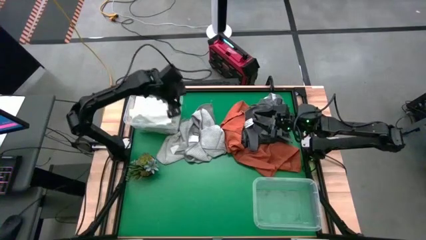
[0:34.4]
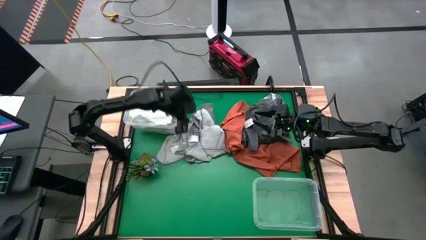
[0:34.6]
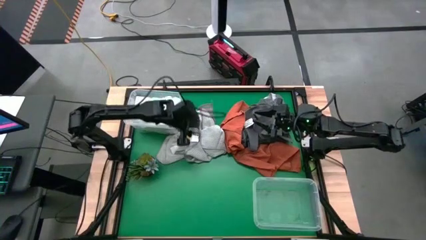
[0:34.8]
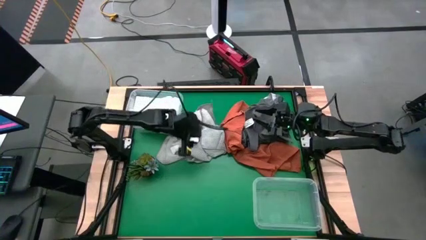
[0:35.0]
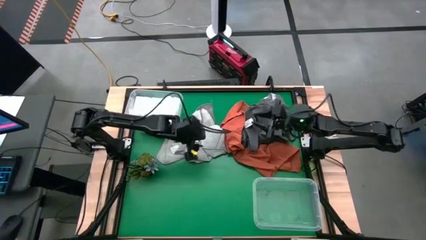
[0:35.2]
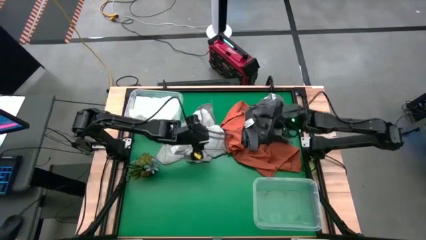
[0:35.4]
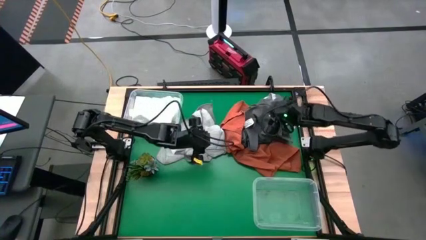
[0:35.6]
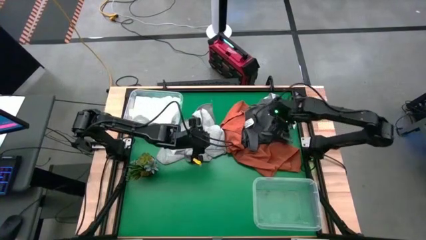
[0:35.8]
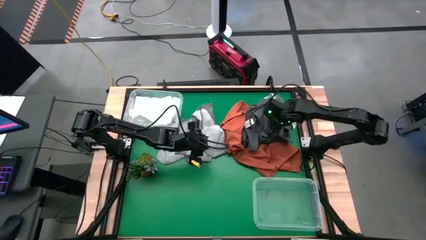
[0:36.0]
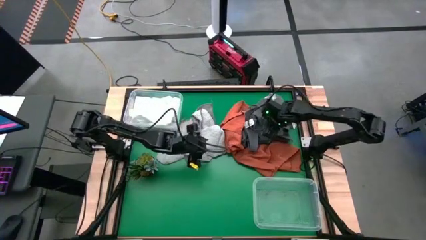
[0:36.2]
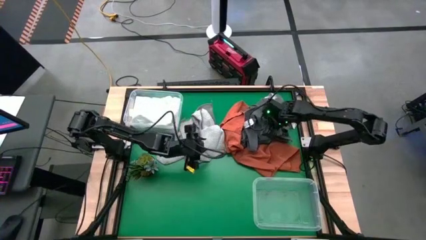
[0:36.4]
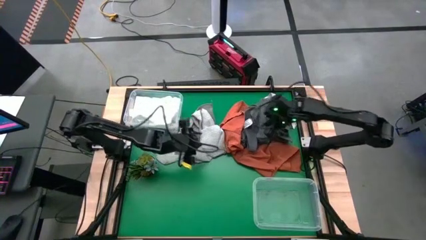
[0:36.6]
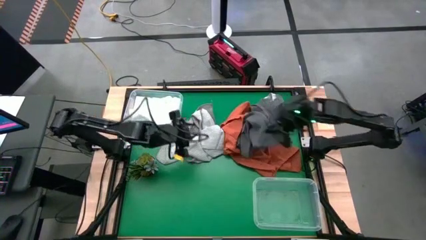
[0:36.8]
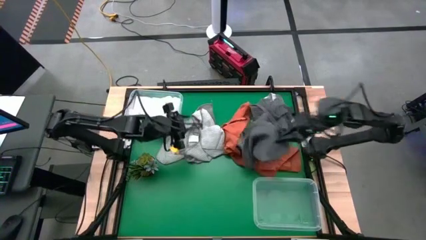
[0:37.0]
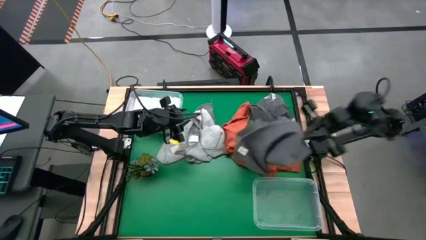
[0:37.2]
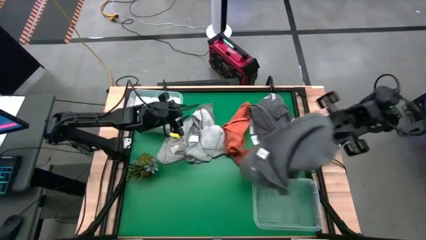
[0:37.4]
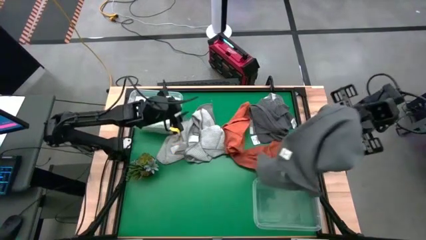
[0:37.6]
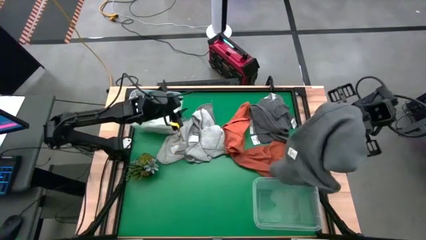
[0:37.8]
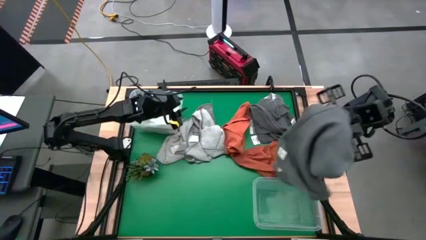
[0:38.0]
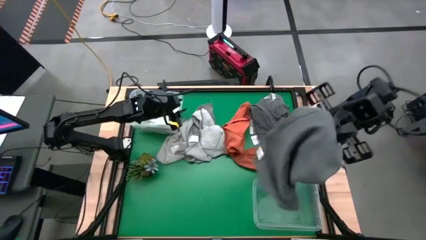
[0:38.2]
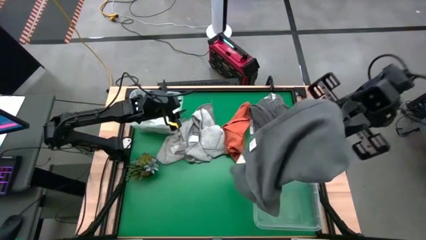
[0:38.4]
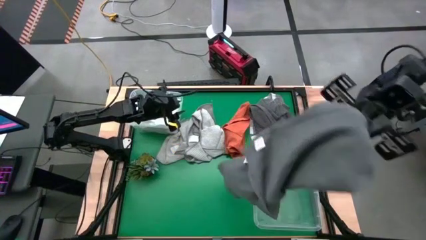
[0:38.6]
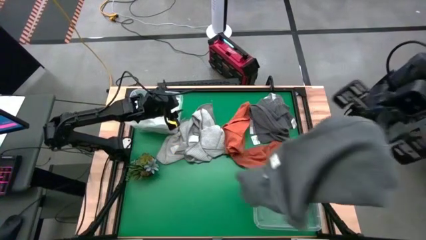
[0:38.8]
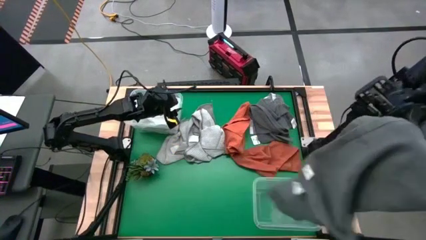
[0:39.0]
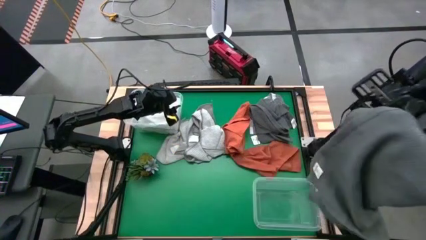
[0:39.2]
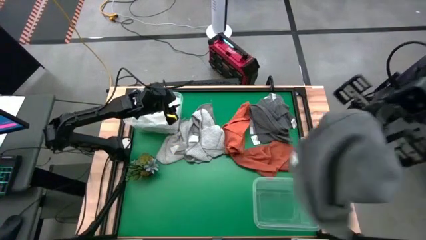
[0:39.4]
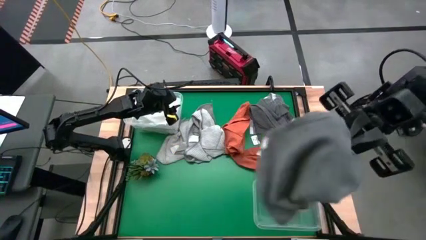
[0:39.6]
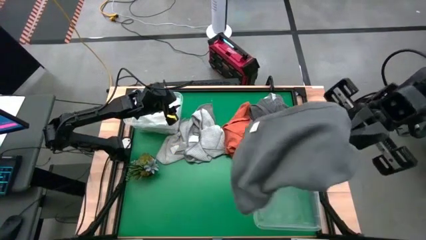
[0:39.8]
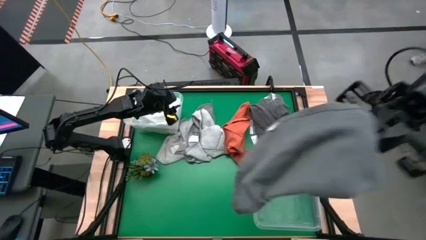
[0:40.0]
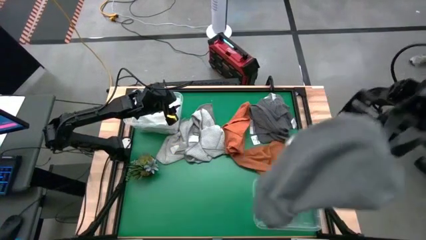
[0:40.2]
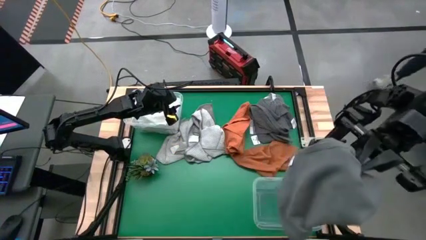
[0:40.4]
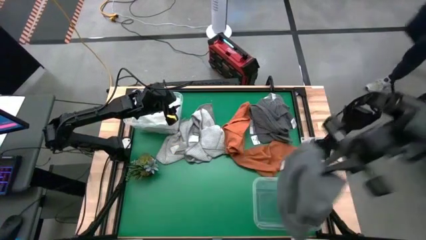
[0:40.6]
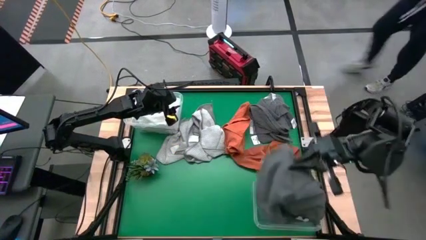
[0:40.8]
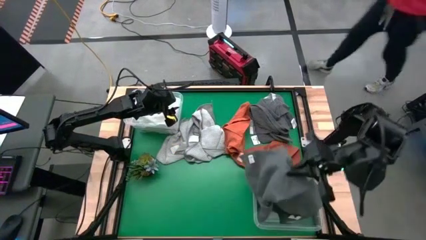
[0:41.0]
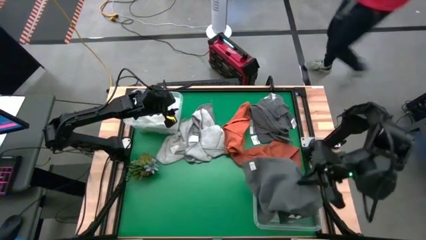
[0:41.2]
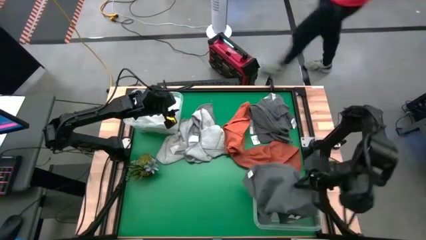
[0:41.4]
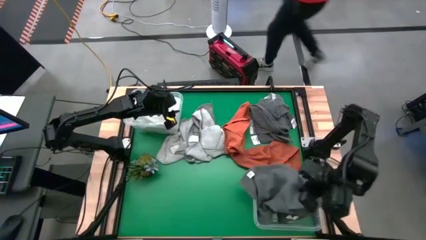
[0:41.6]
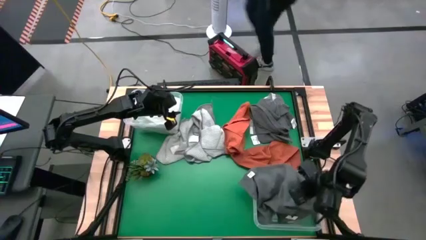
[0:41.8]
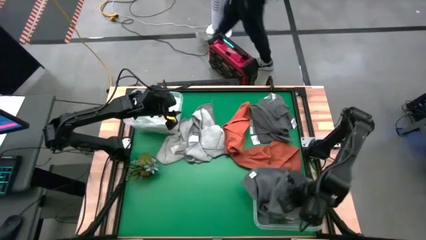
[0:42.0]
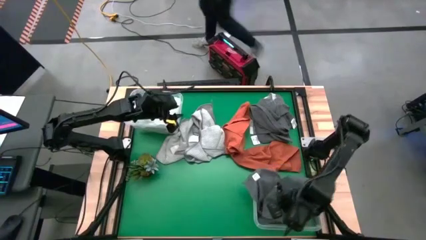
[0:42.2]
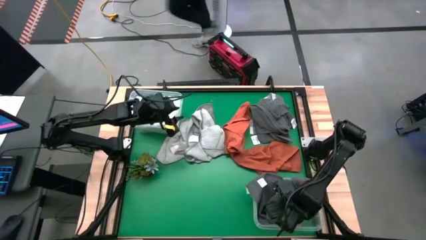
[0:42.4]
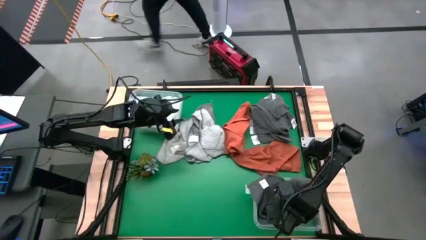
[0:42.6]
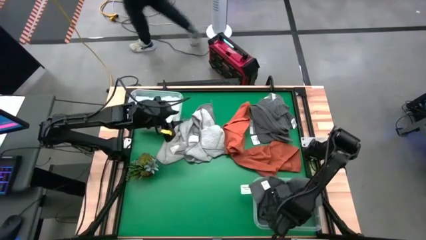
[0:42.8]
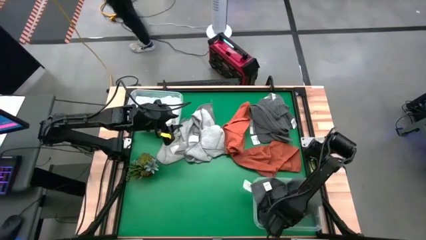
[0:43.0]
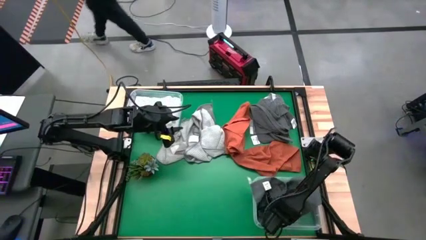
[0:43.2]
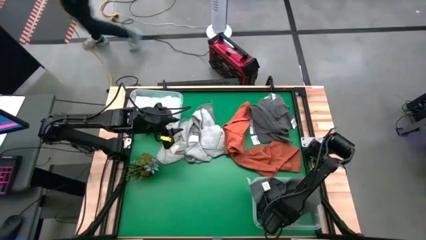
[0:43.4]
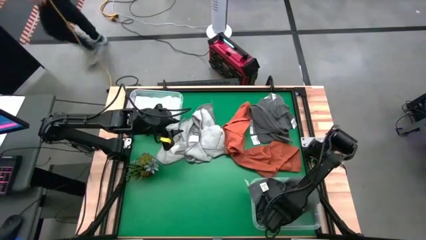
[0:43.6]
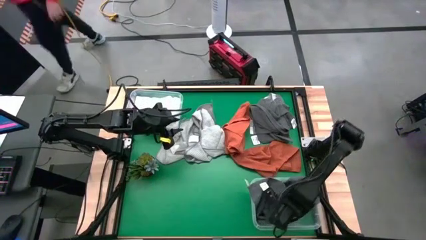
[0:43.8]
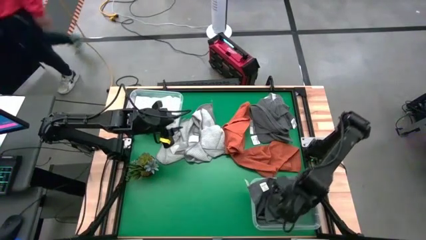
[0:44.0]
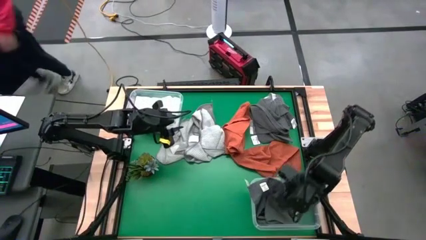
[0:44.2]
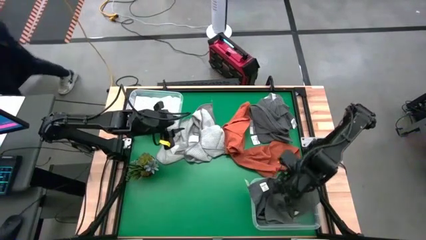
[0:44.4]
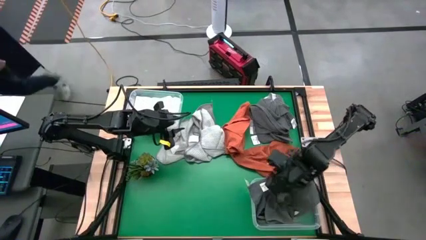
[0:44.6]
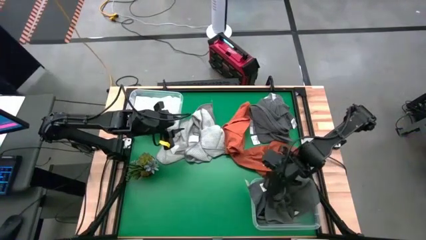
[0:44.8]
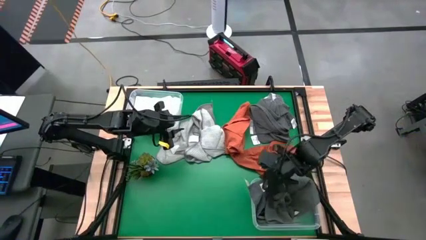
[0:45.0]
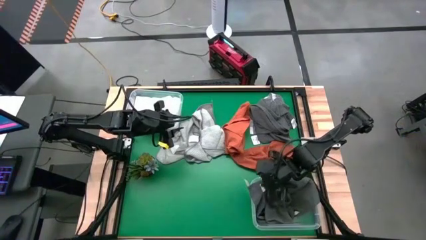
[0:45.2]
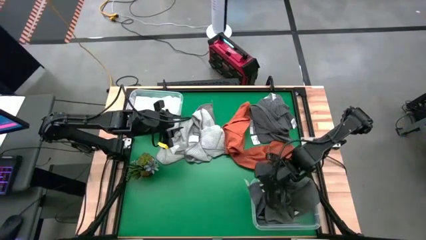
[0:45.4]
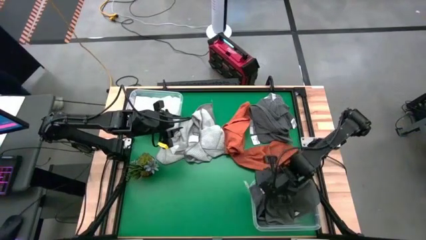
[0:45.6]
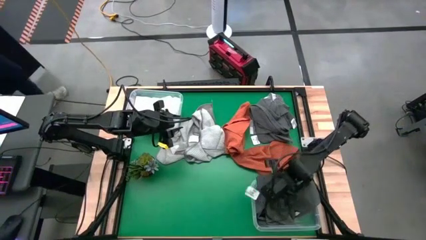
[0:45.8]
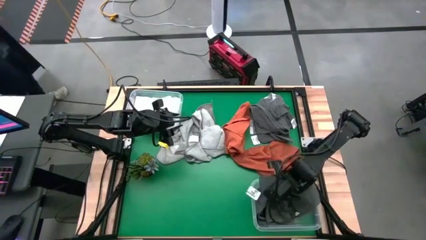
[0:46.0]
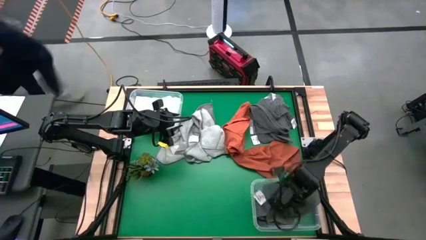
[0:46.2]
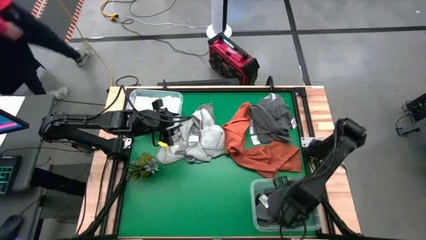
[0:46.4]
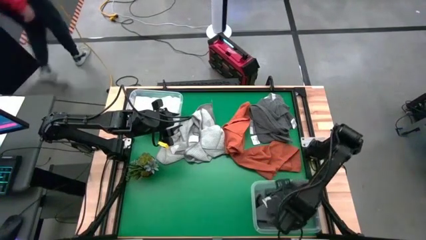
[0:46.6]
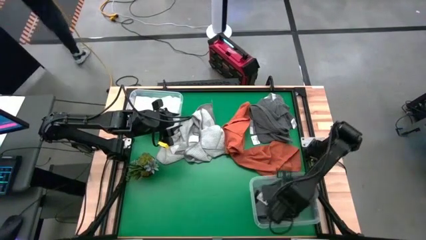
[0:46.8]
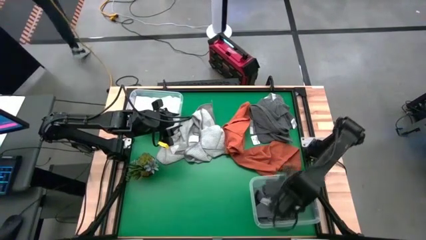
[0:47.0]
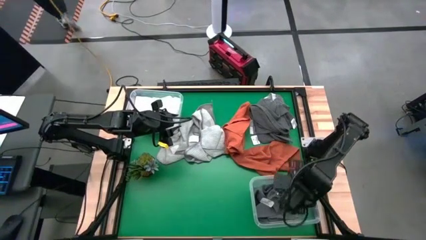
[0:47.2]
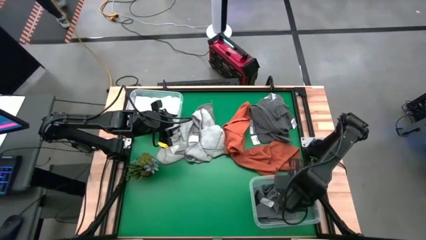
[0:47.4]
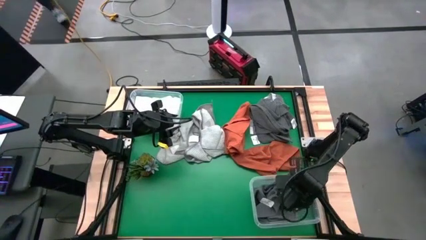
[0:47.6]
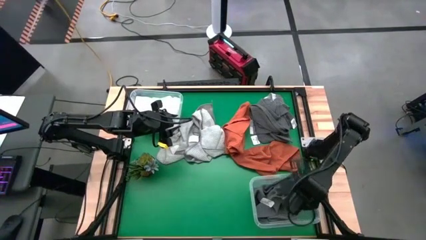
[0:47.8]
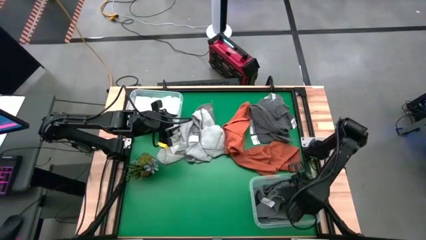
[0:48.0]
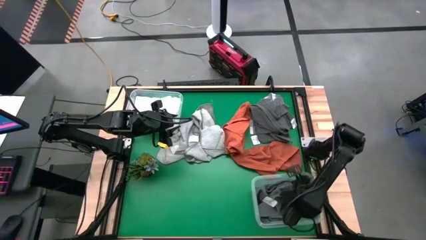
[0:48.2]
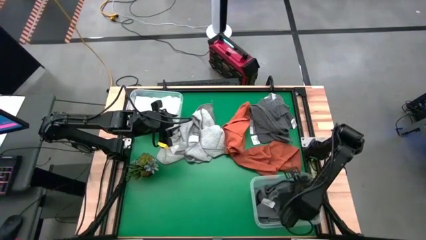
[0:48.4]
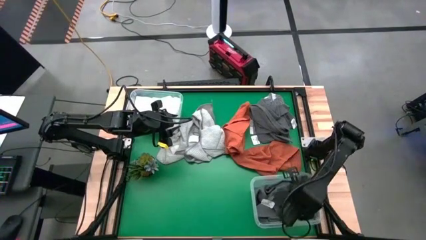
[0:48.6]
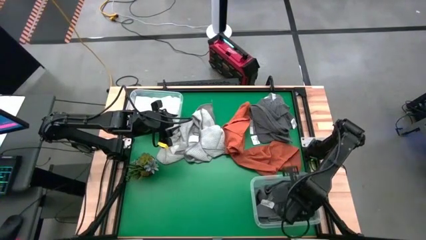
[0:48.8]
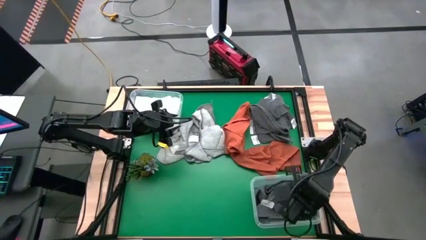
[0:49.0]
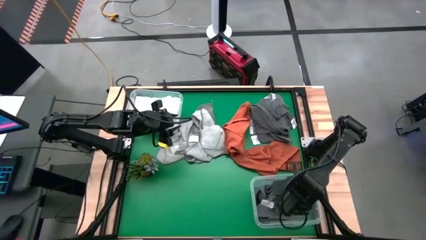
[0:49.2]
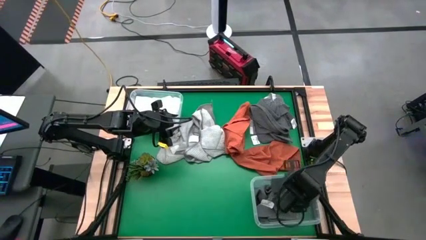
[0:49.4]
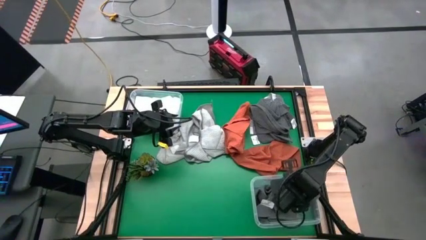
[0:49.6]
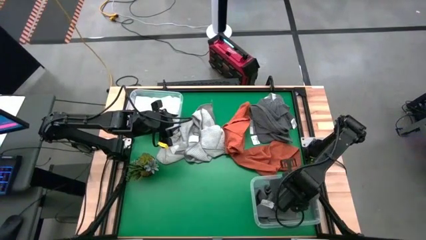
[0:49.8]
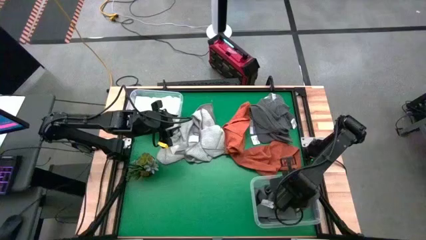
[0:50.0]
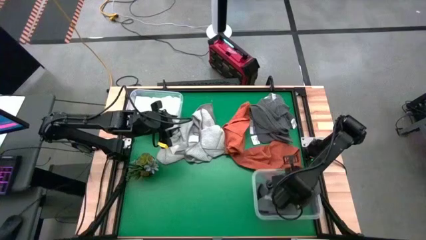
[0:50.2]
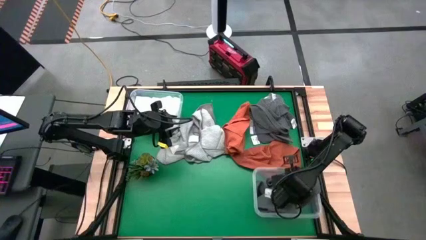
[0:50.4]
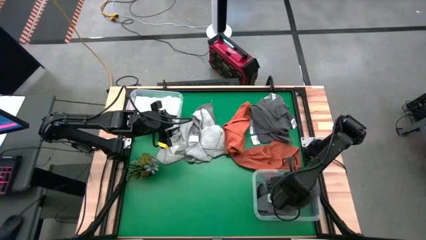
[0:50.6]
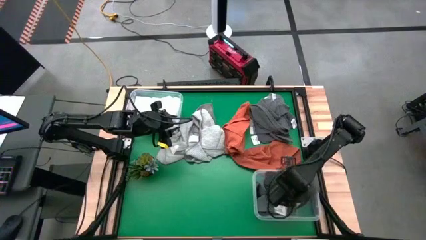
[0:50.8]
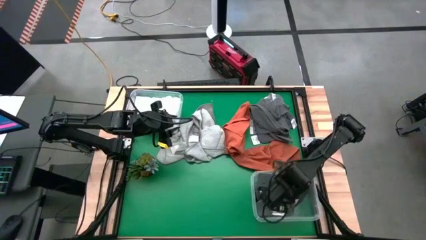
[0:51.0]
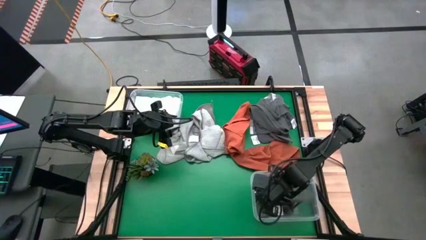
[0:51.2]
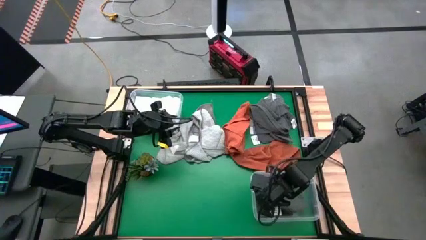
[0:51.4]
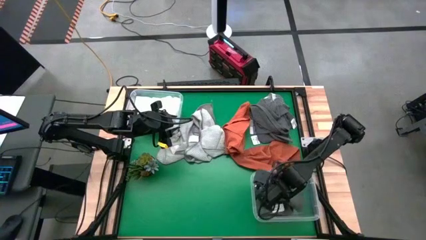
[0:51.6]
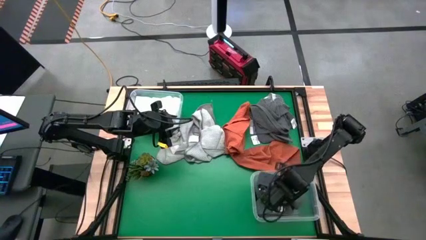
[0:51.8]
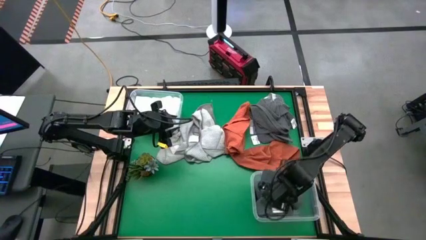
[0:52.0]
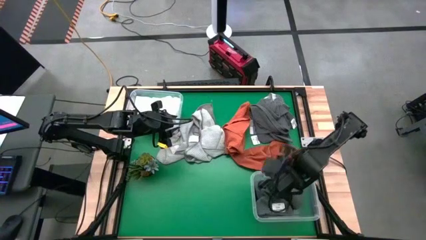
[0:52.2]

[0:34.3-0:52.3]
Task: Sort towels by color in basket
Put the dark gray towel into the bottom transparent bin
